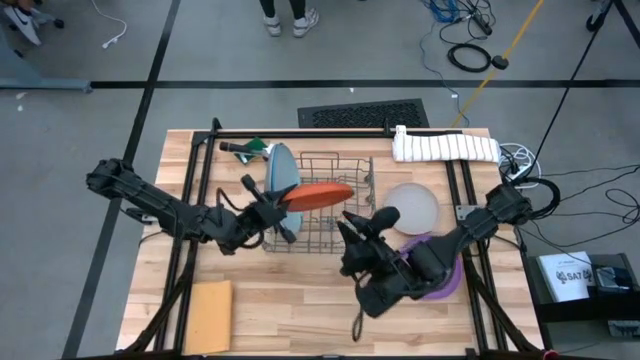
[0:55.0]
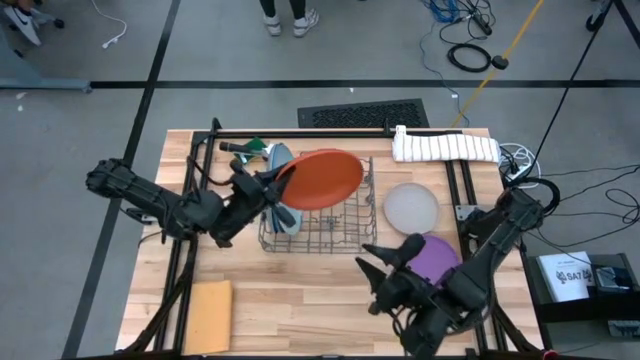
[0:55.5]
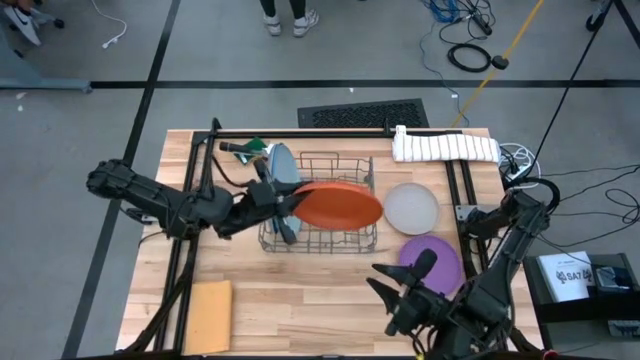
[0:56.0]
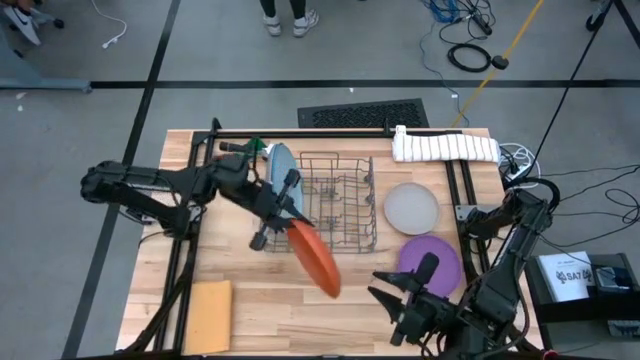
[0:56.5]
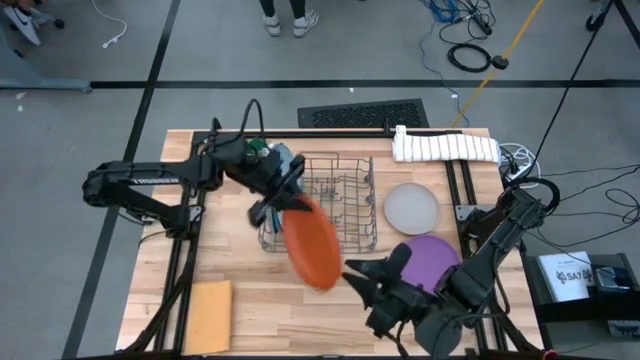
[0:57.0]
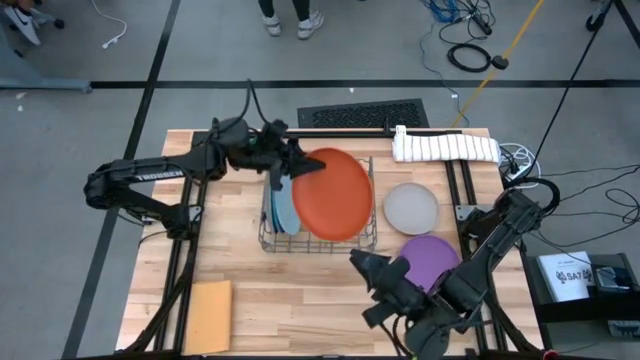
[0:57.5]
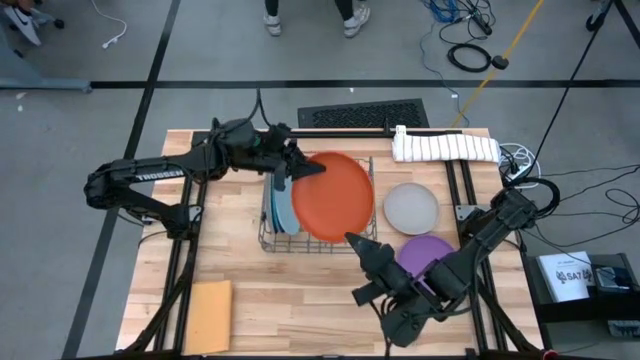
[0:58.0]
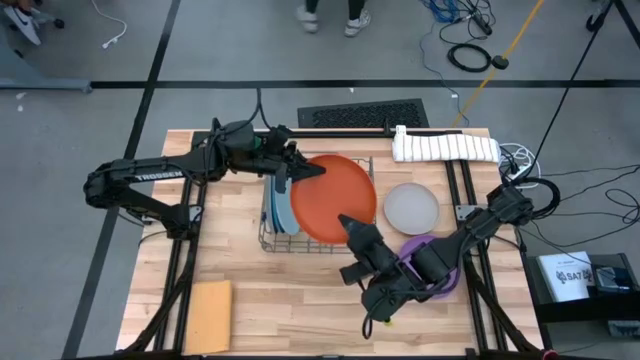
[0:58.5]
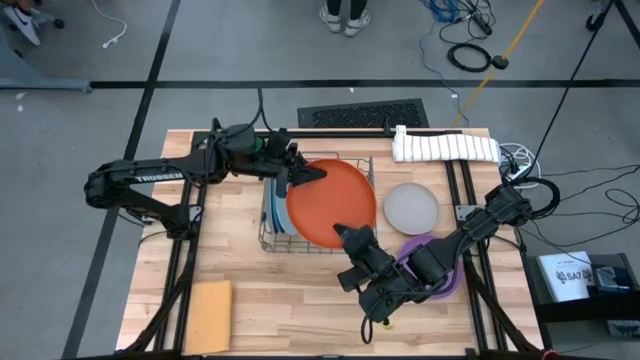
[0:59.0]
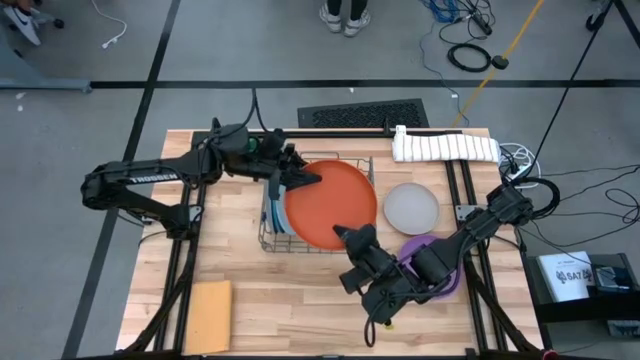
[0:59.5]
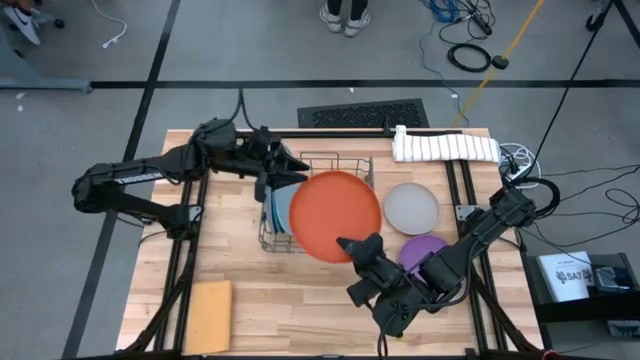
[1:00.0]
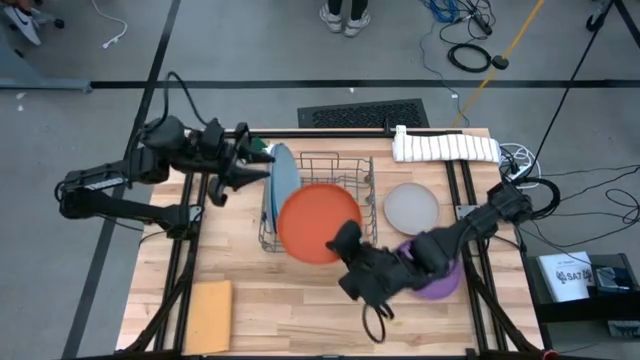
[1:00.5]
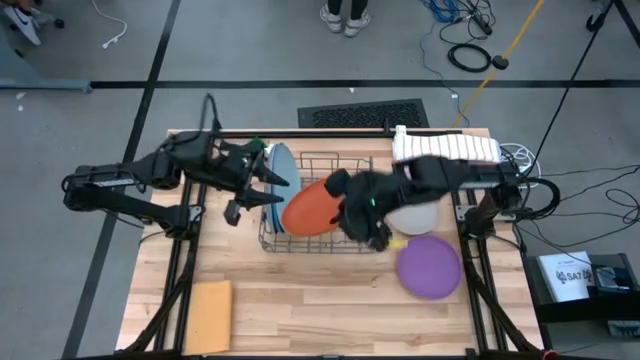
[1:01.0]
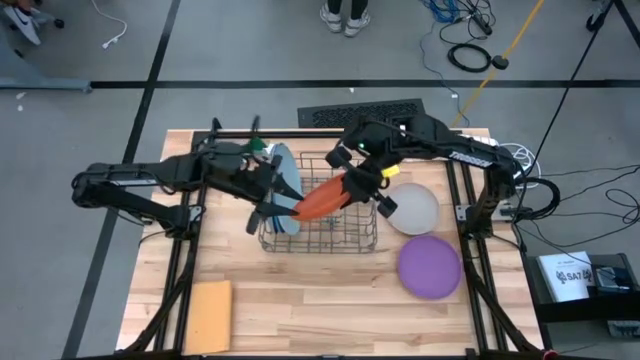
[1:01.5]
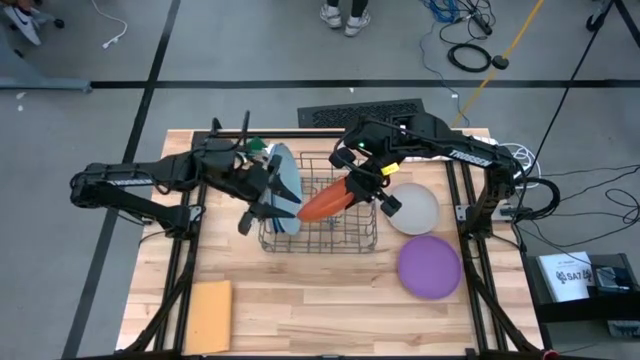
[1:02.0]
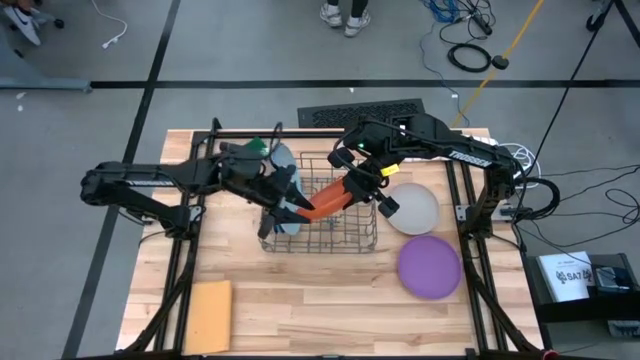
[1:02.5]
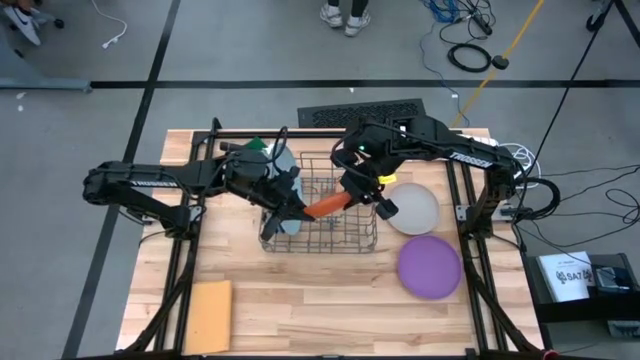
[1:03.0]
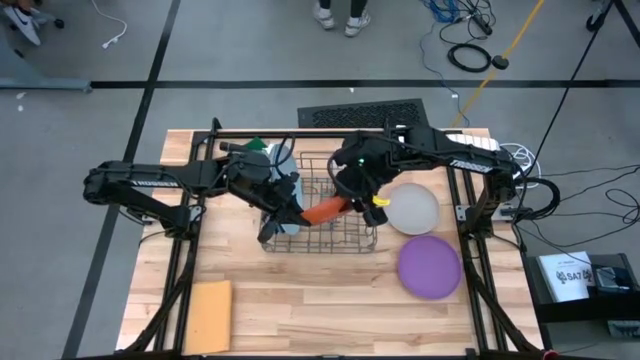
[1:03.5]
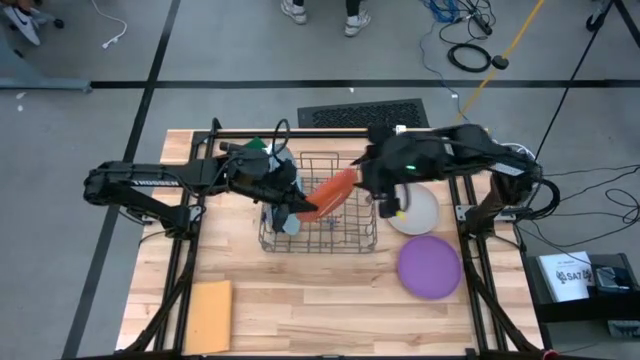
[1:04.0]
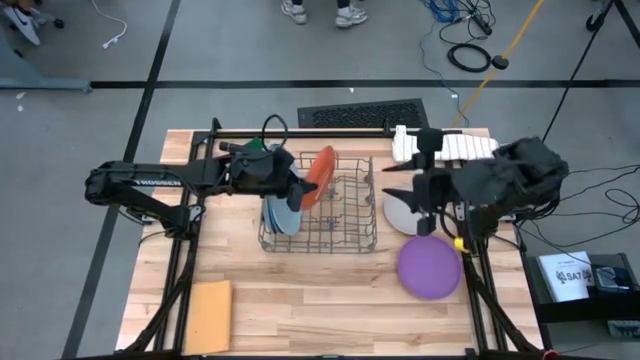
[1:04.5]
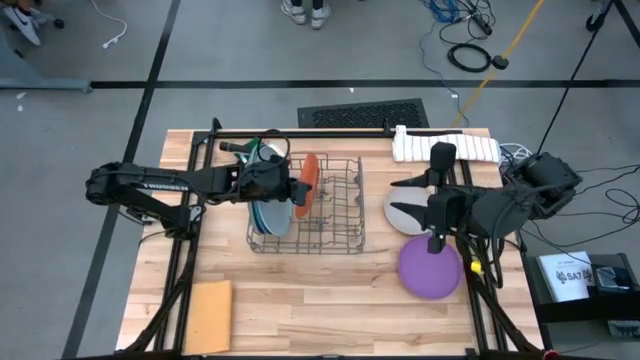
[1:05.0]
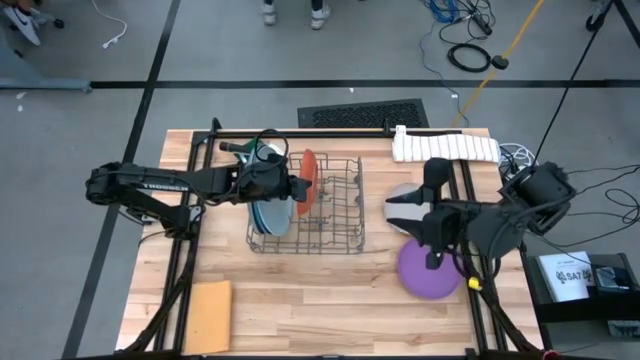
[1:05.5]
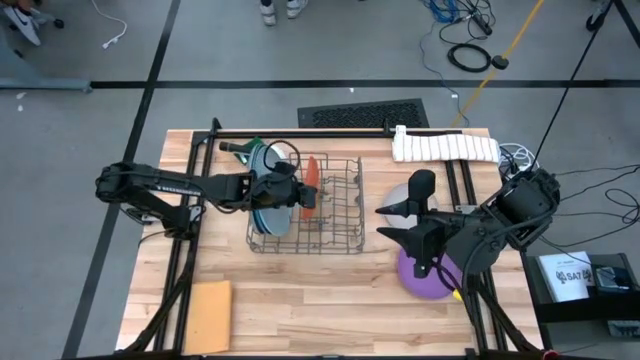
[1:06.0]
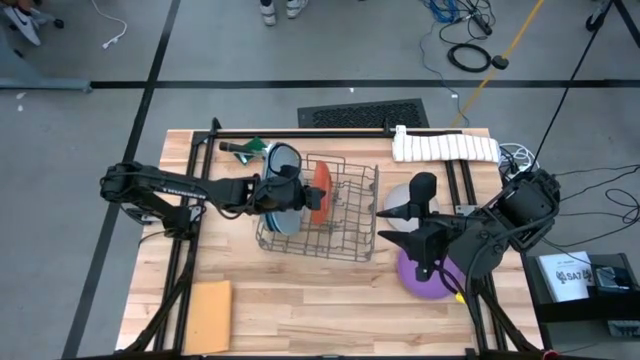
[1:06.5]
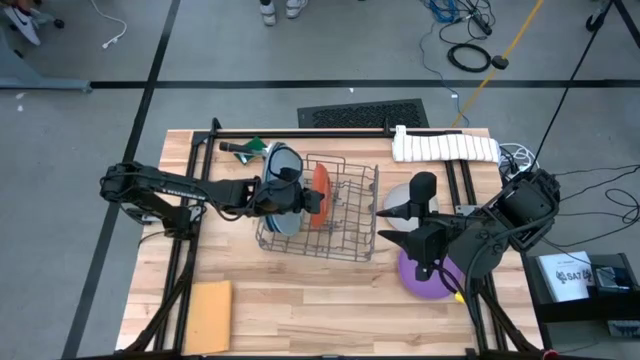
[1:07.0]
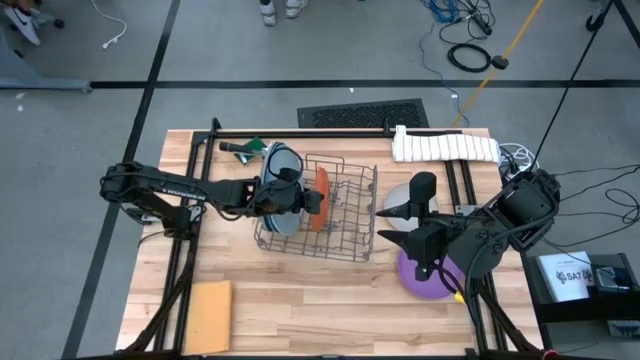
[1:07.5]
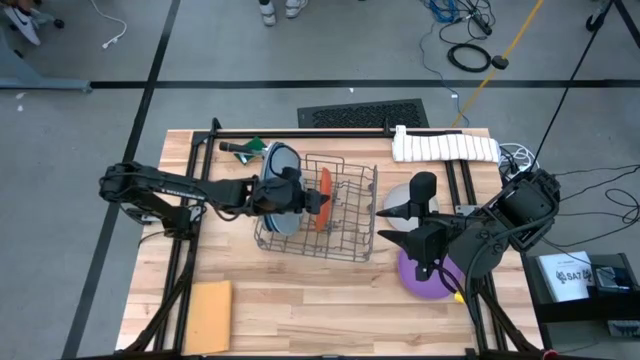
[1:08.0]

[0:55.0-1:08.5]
Task: Sort dishes
Put the orange plate into the green dish rack
